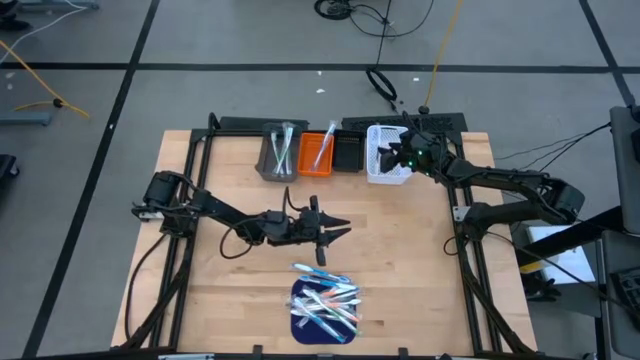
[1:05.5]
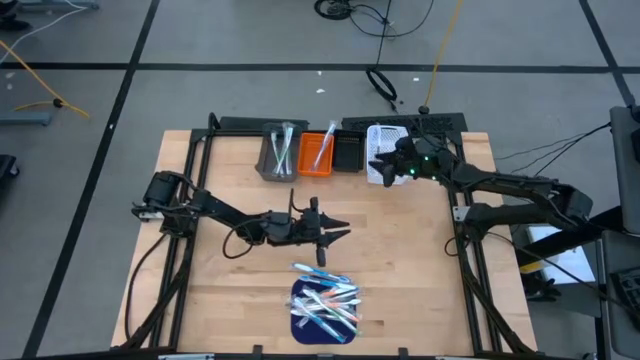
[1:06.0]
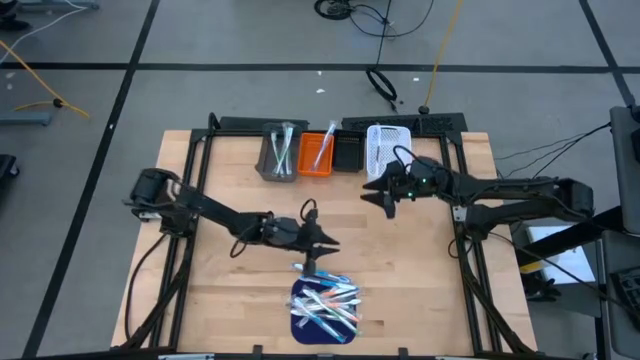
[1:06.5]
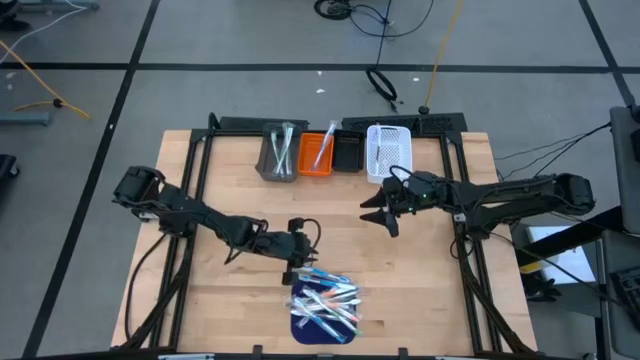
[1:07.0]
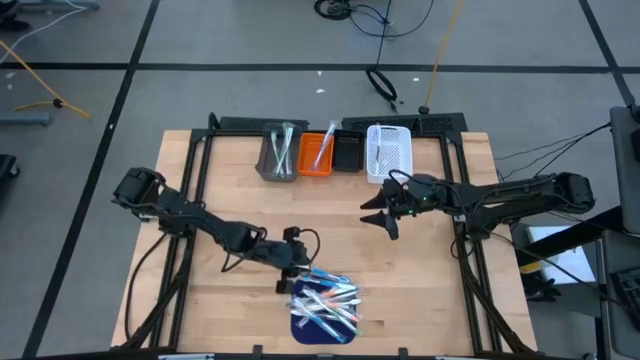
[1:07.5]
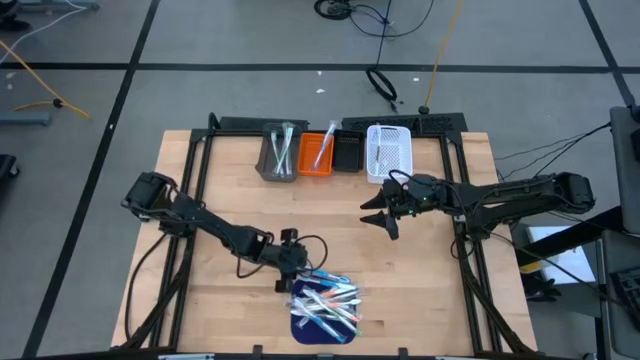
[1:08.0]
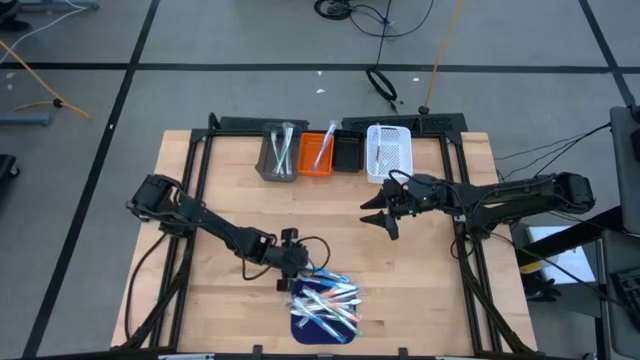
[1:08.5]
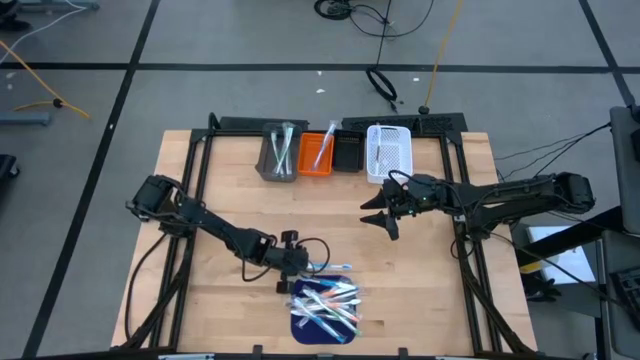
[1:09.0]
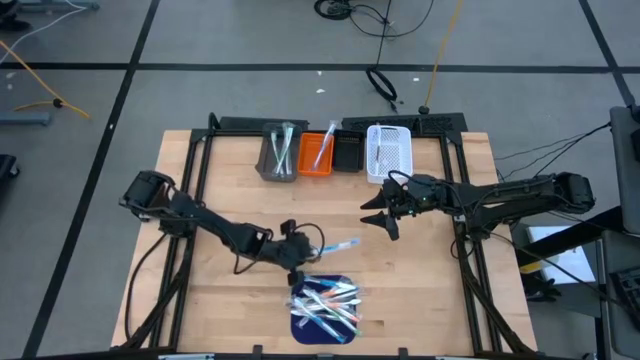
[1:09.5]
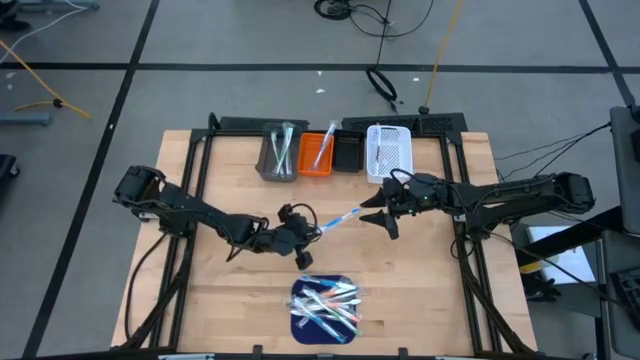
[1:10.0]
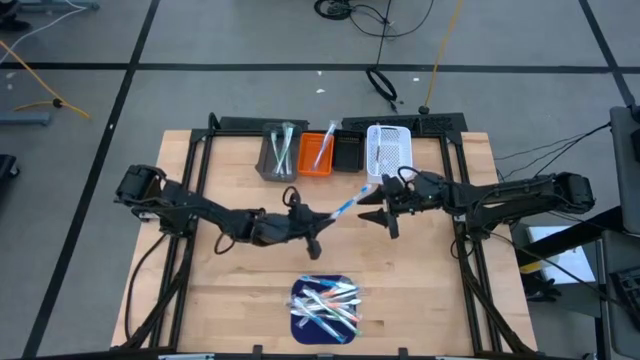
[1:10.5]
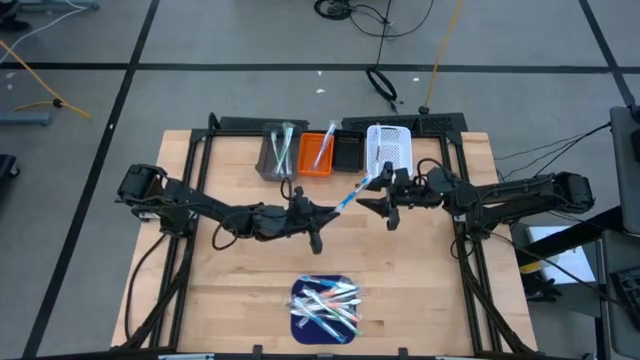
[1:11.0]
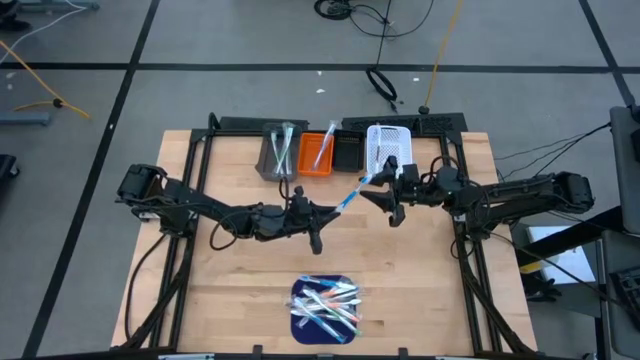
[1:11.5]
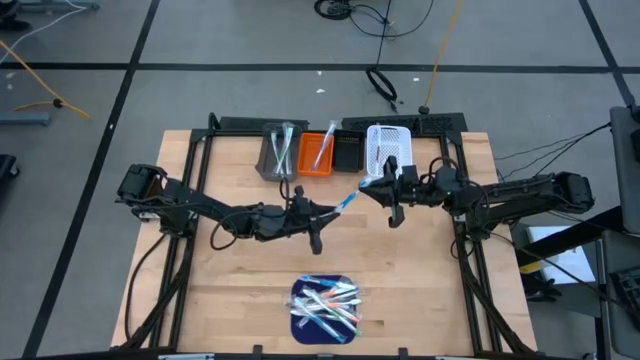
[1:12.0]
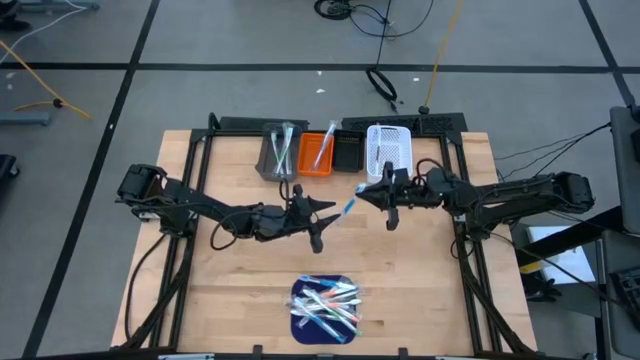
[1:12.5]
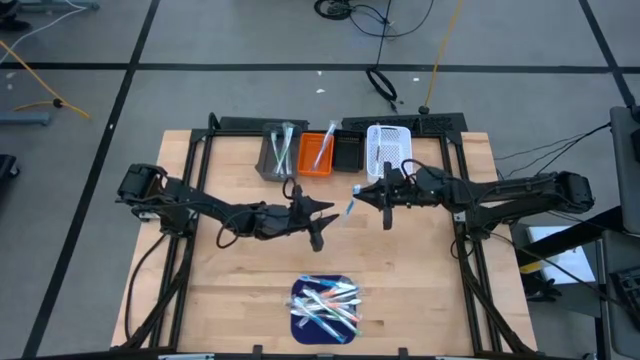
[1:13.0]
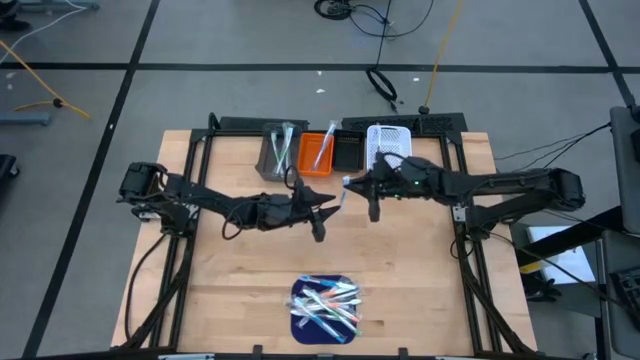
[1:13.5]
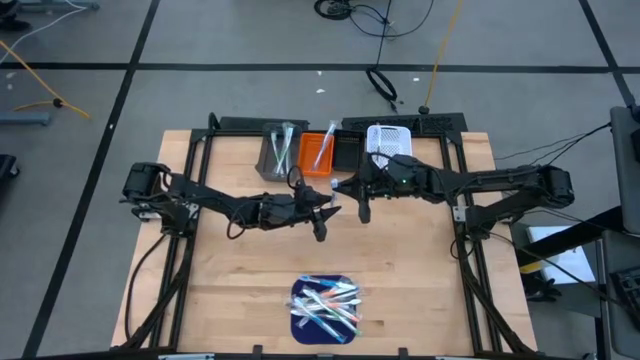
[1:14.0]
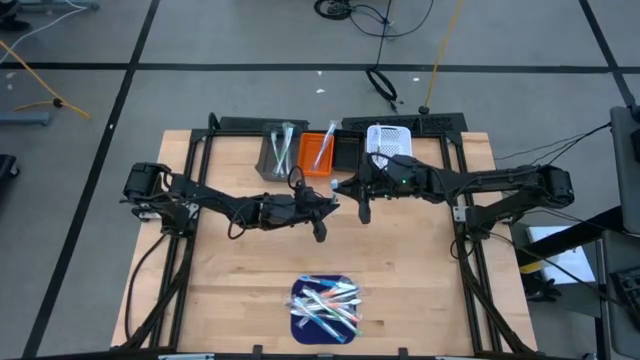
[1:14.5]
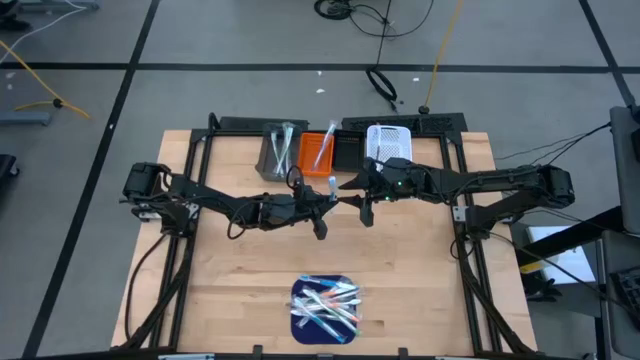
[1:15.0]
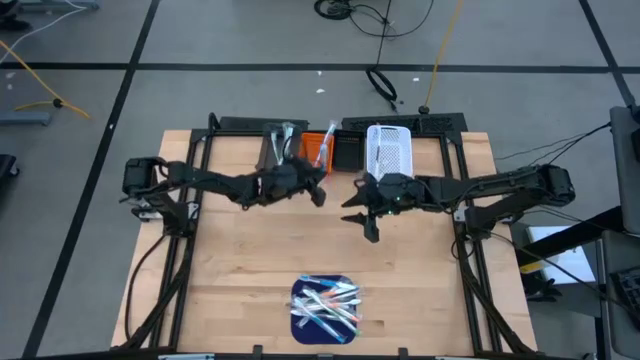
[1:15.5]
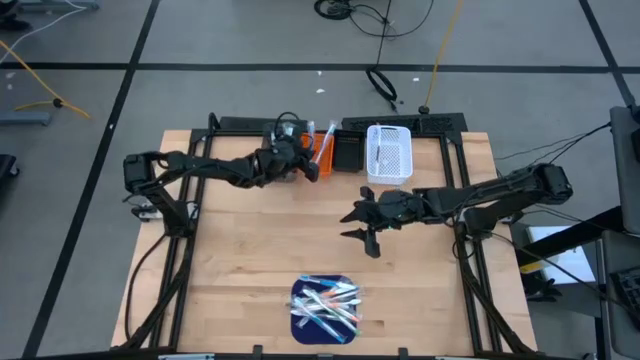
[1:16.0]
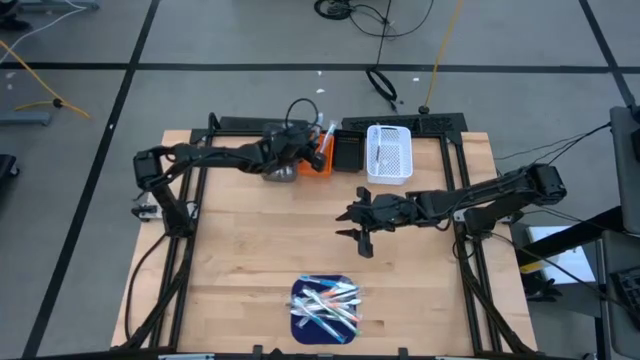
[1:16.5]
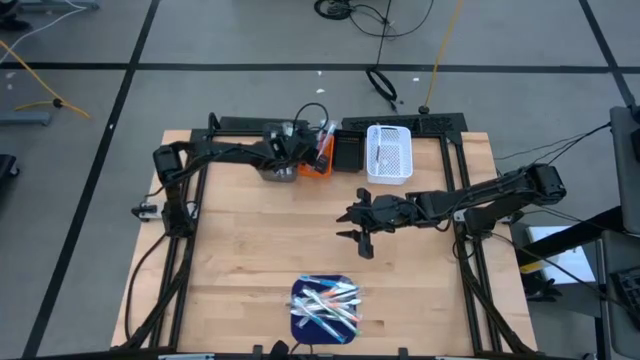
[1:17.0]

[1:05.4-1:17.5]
Task: Pick & Place Toothbrushes
Put the blue toothbrush into the orange bin

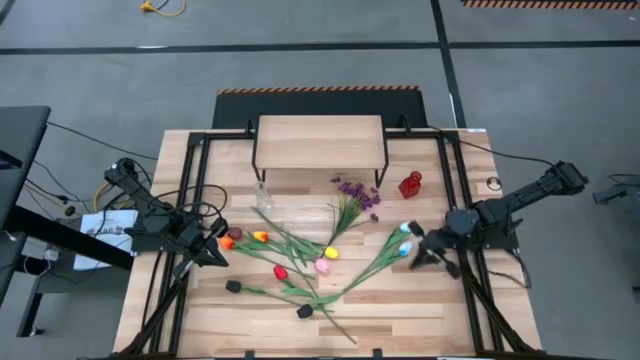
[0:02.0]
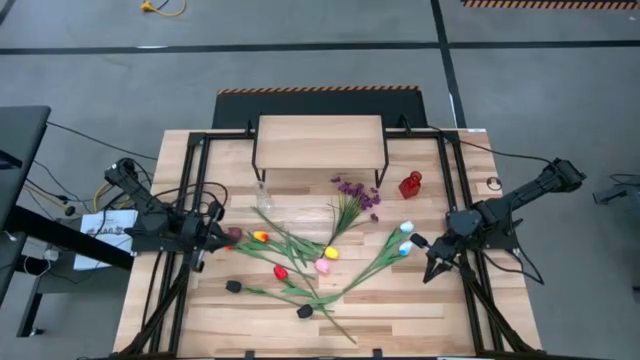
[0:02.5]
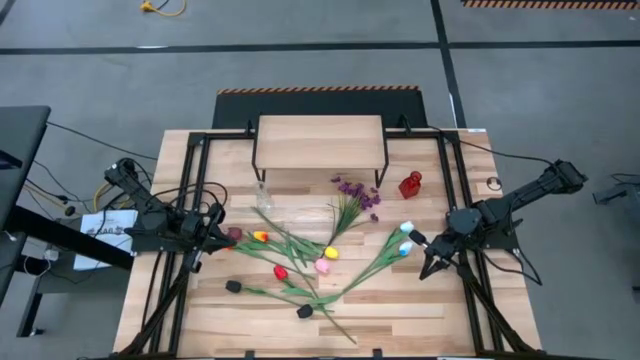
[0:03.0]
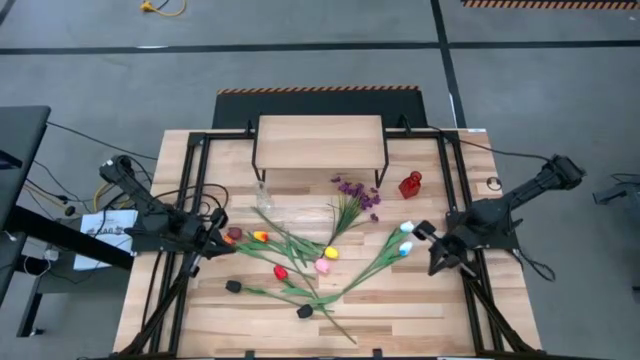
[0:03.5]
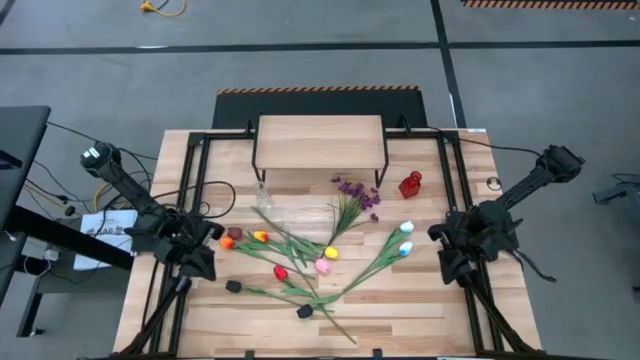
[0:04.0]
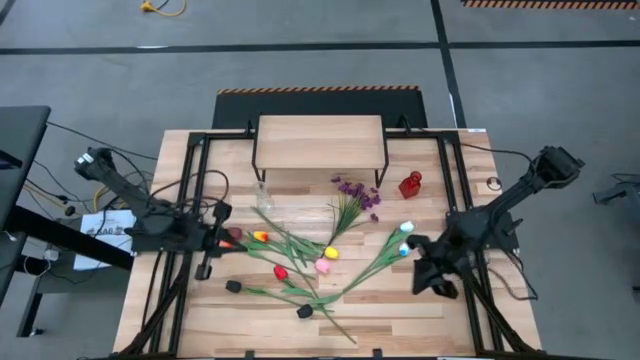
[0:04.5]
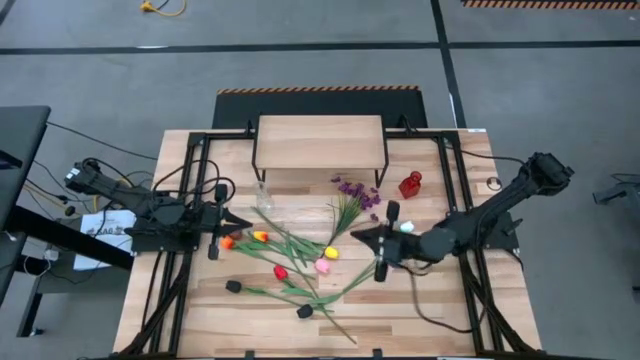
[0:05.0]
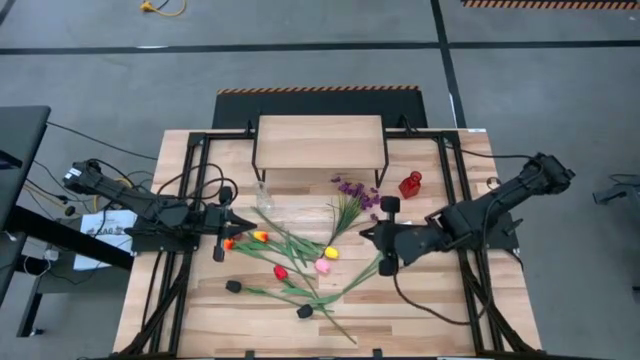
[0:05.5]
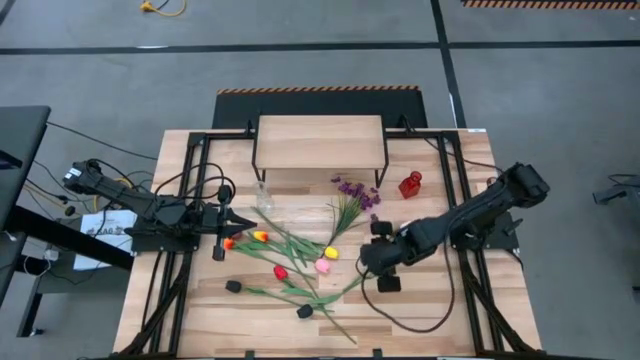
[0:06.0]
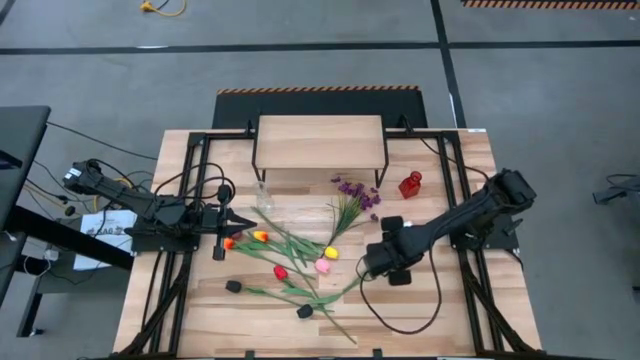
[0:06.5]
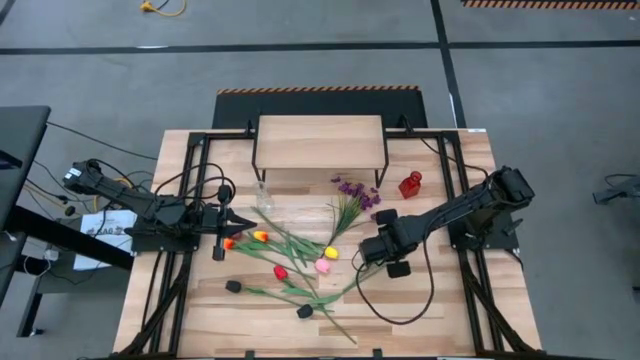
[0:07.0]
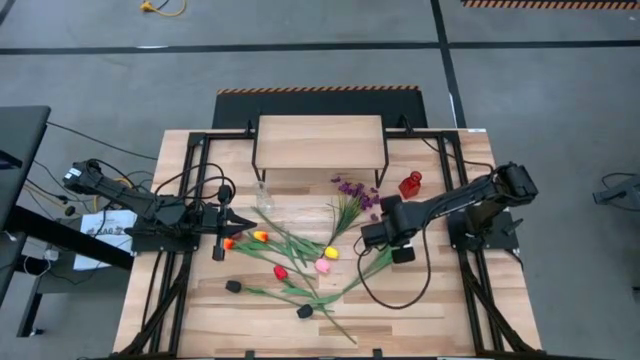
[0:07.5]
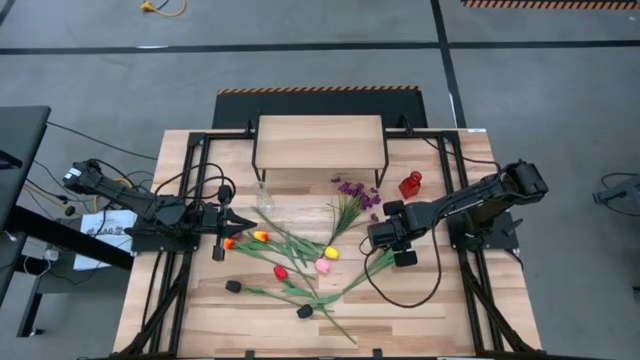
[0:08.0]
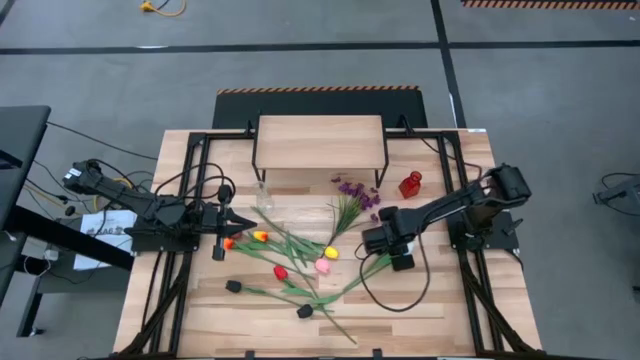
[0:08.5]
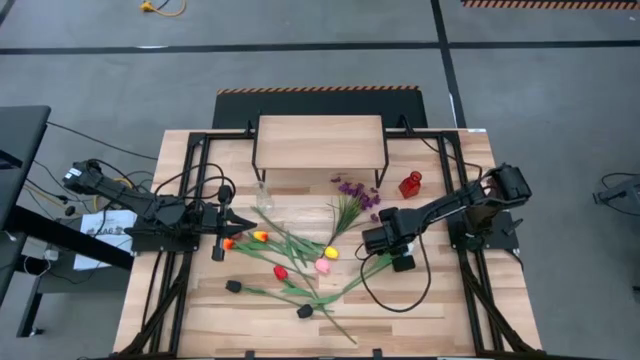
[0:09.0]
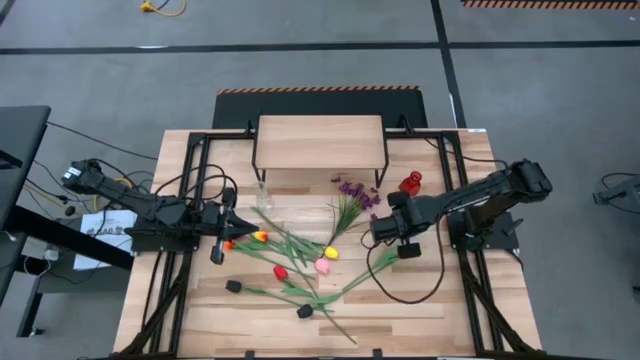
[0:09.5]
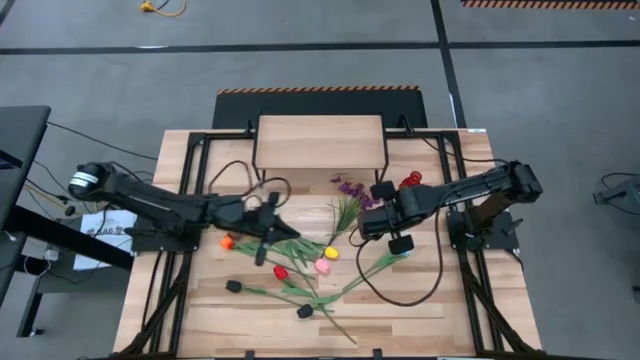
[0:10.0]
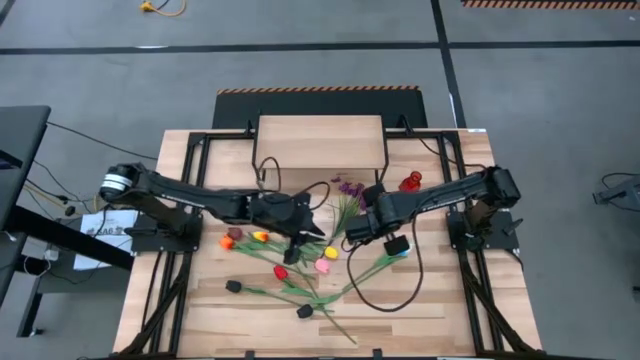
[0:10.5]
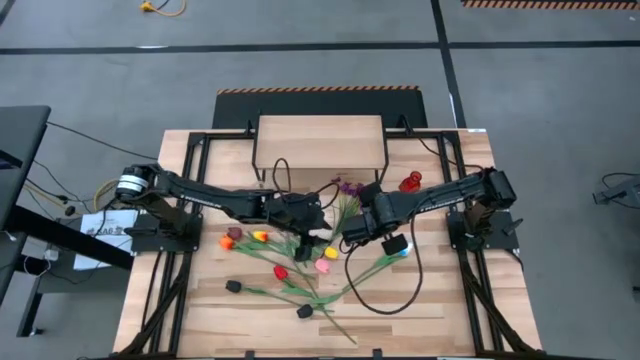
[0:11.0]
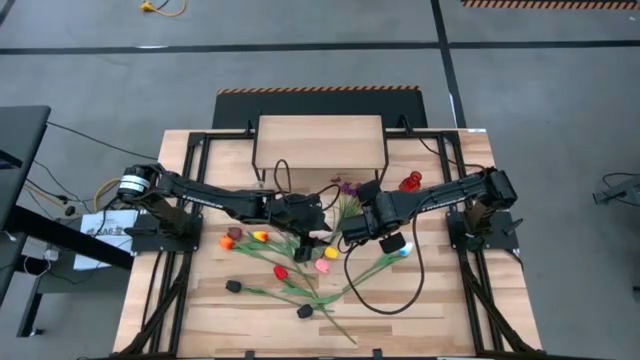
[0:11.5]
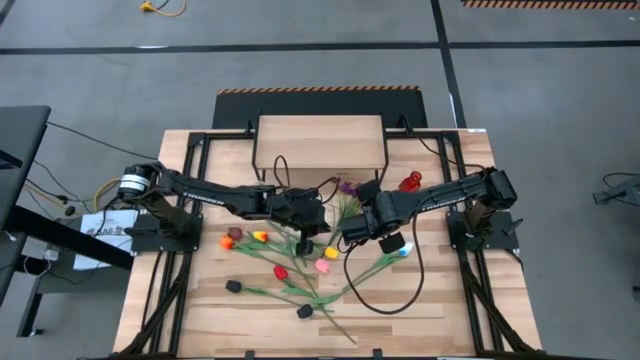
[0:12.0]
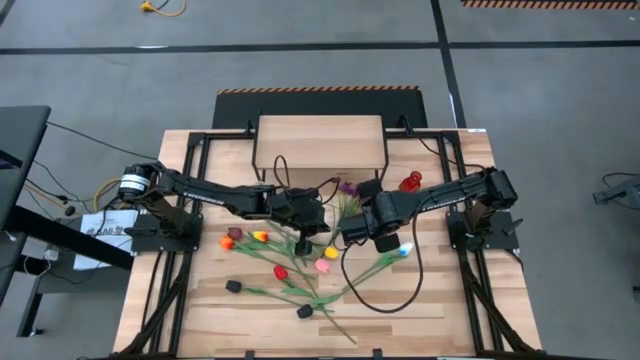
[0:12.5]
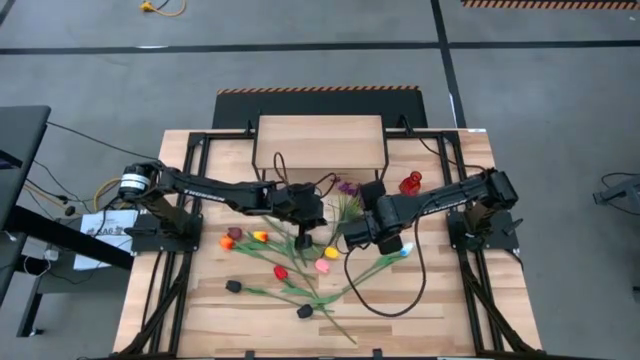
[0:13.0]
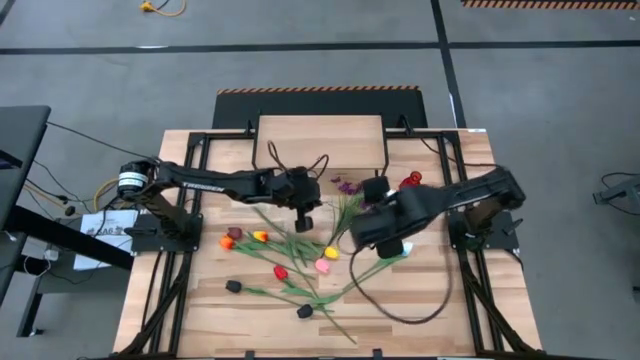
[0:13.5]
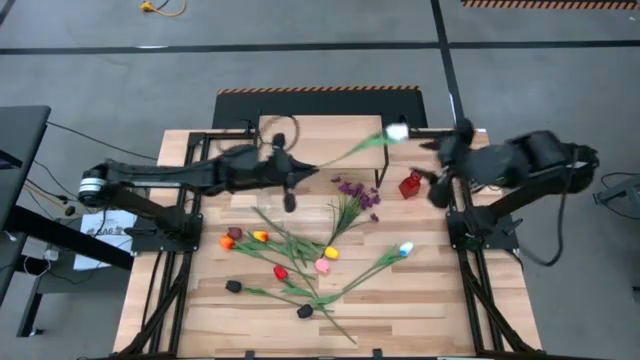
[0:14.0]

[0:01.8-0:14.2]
Task: Pick and place flowers into a vace then onto a shelf
Put the top white flower into the red vase
